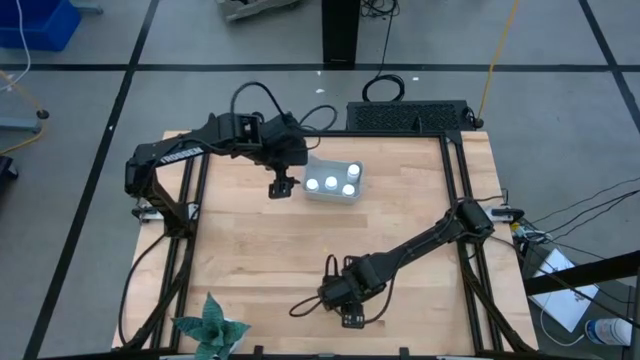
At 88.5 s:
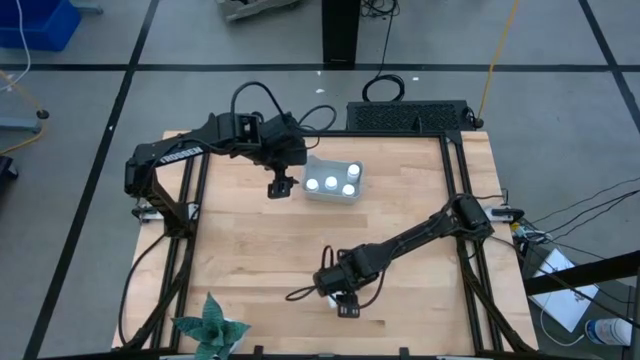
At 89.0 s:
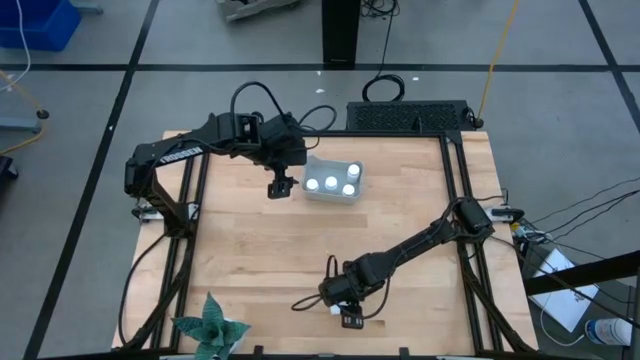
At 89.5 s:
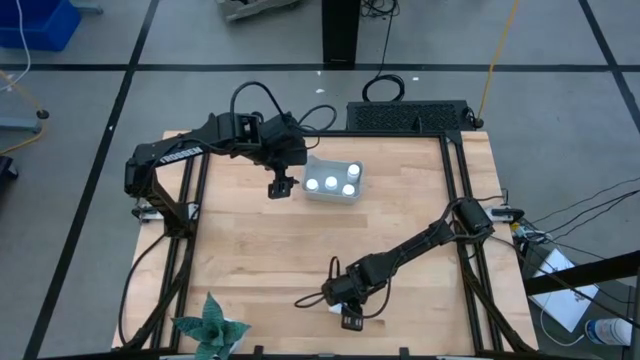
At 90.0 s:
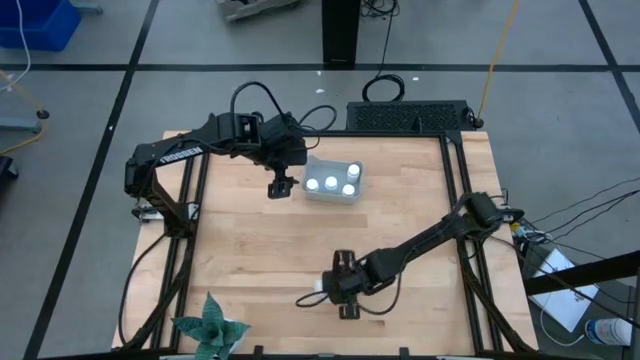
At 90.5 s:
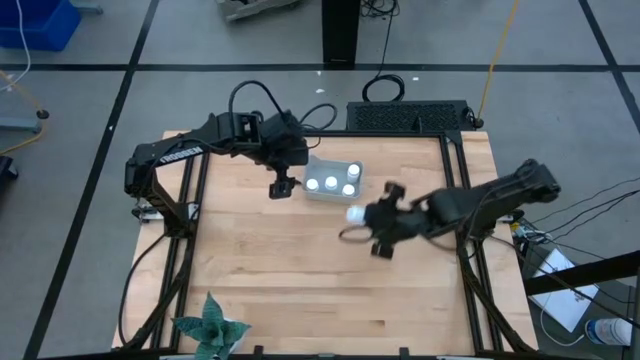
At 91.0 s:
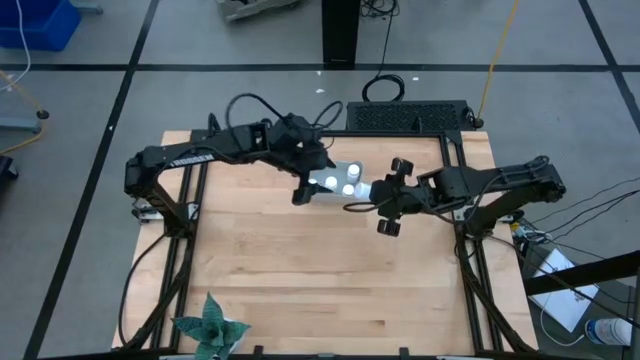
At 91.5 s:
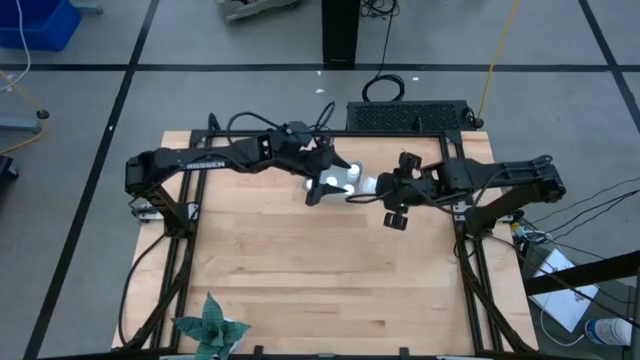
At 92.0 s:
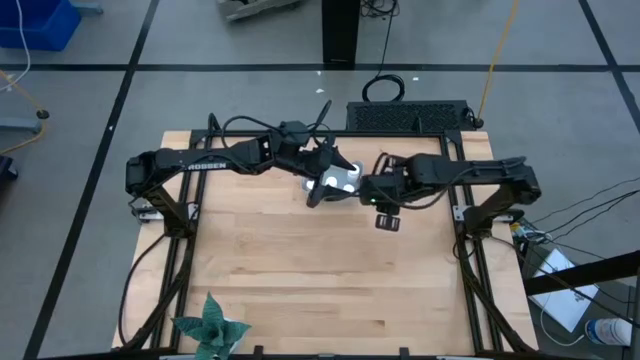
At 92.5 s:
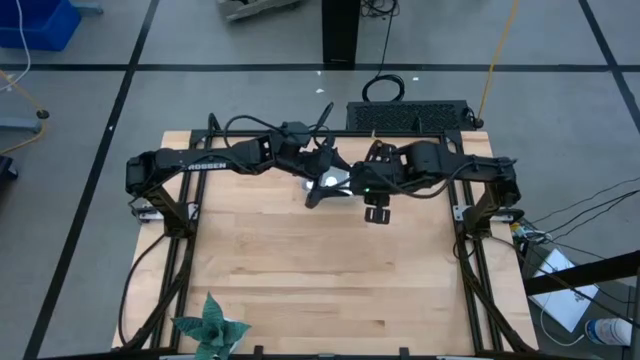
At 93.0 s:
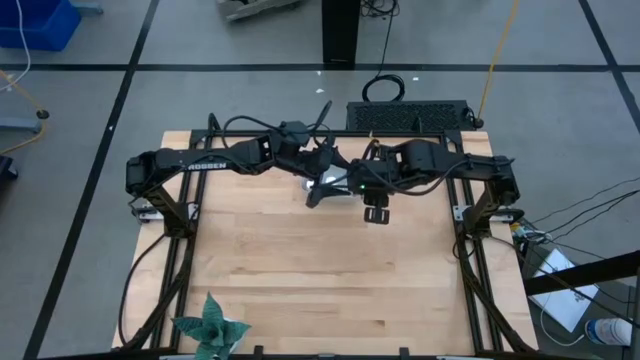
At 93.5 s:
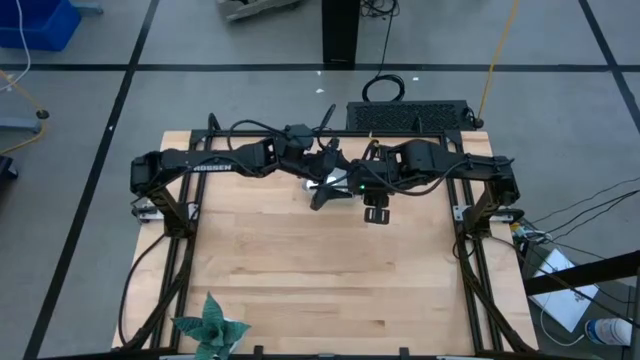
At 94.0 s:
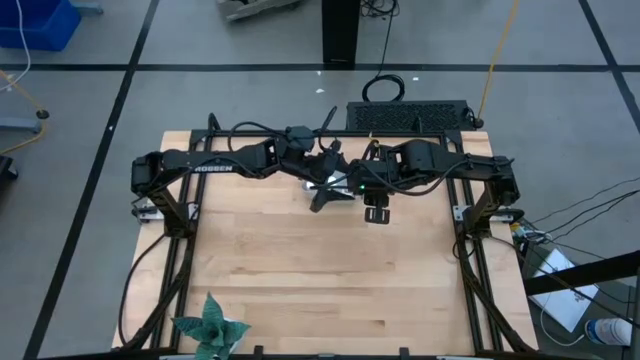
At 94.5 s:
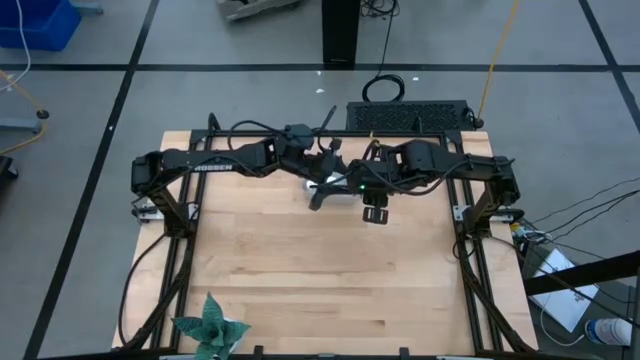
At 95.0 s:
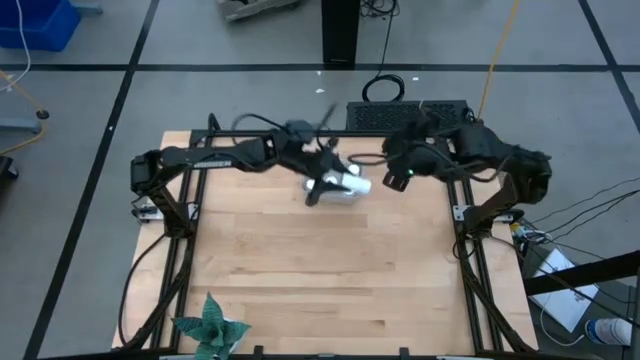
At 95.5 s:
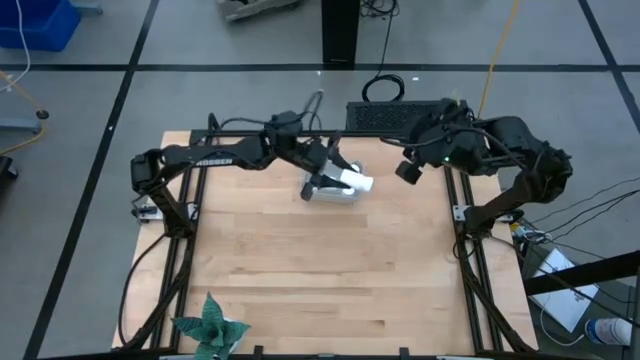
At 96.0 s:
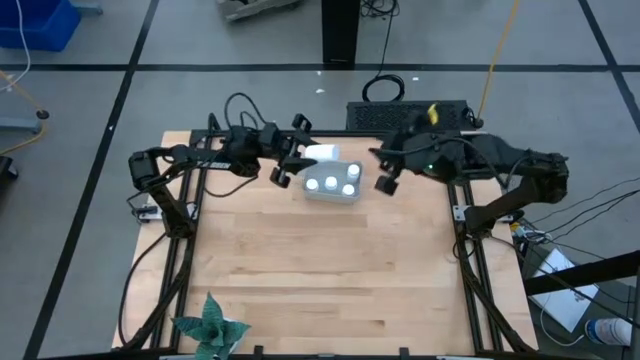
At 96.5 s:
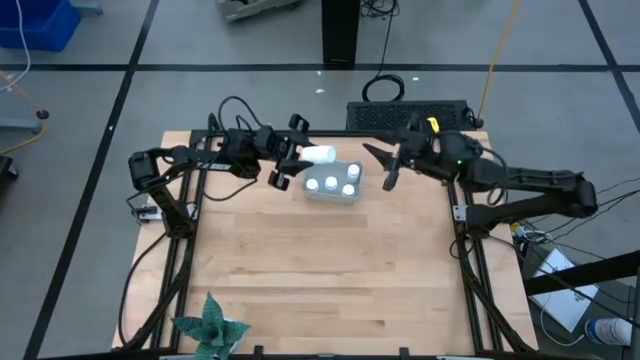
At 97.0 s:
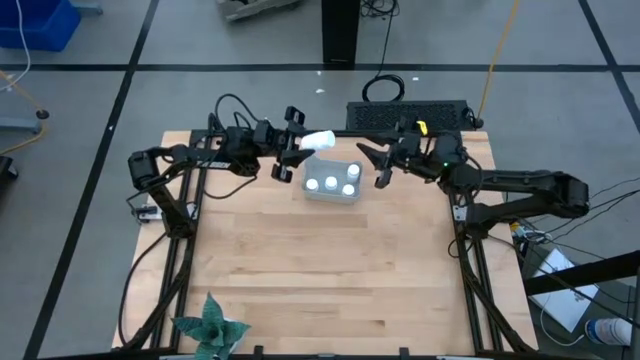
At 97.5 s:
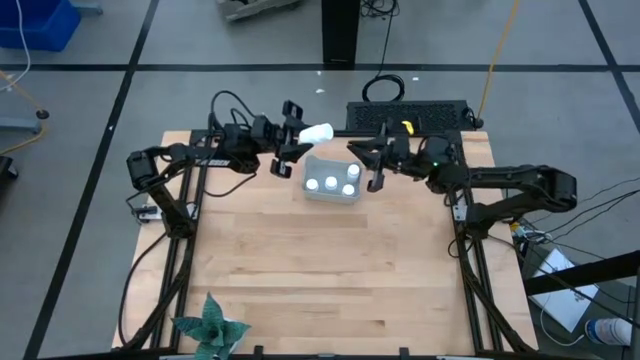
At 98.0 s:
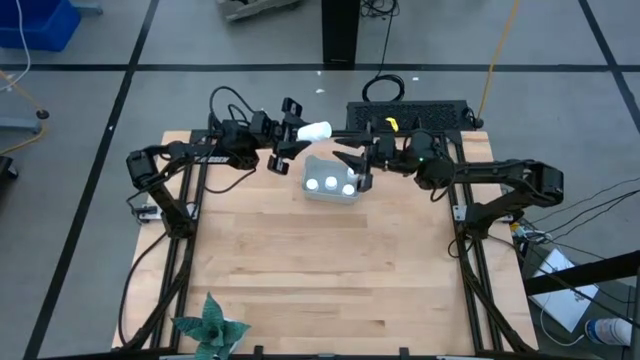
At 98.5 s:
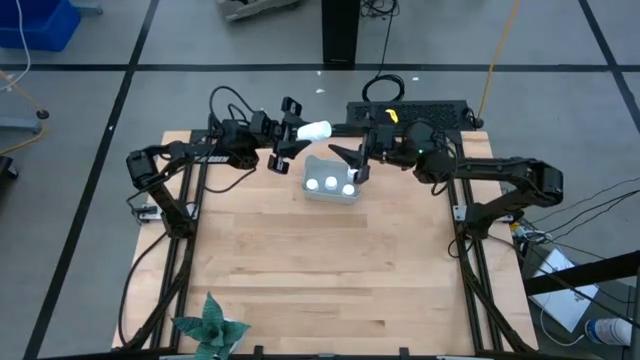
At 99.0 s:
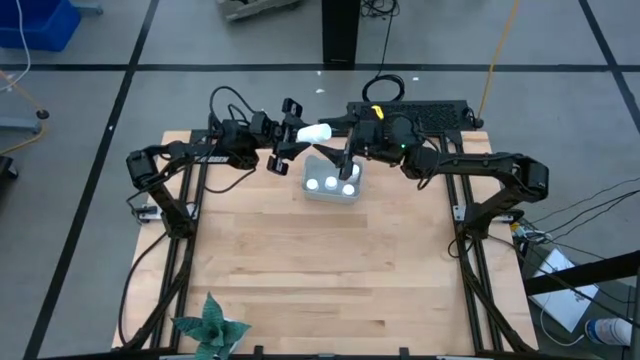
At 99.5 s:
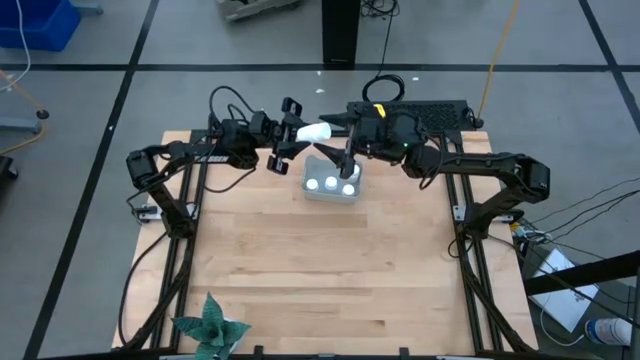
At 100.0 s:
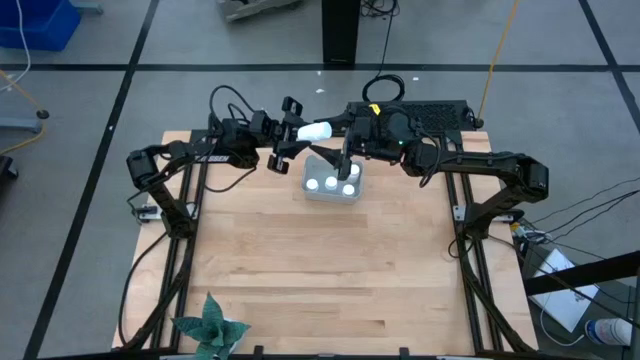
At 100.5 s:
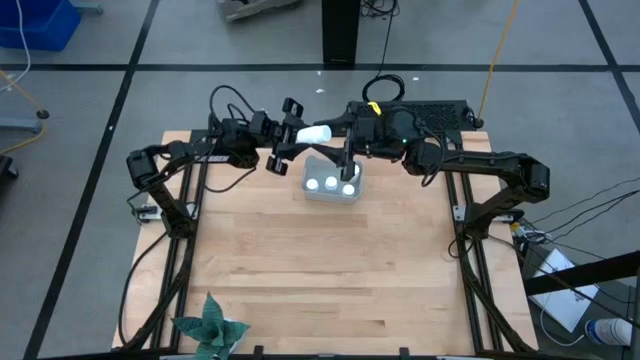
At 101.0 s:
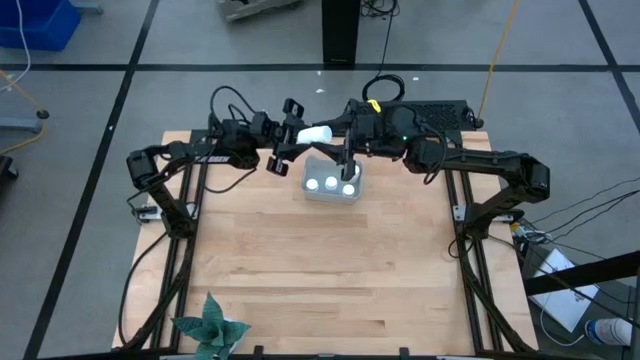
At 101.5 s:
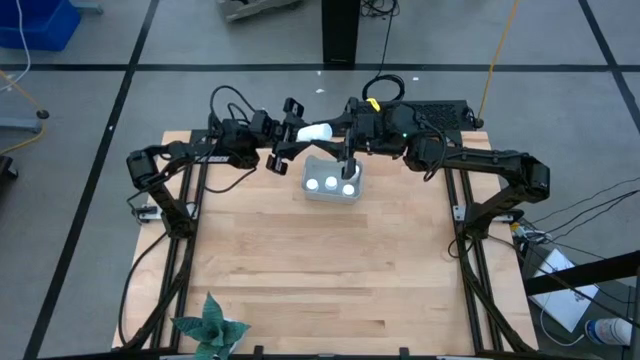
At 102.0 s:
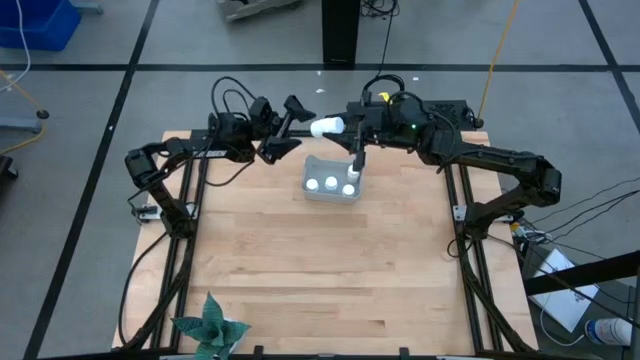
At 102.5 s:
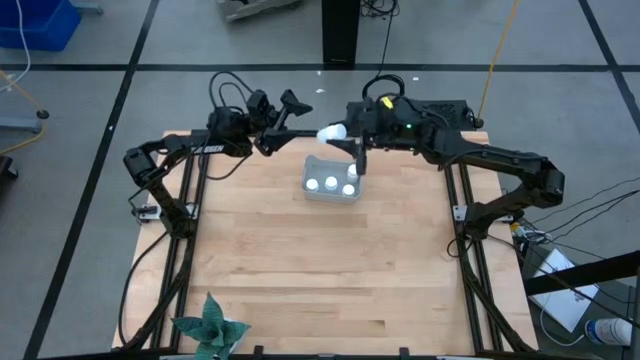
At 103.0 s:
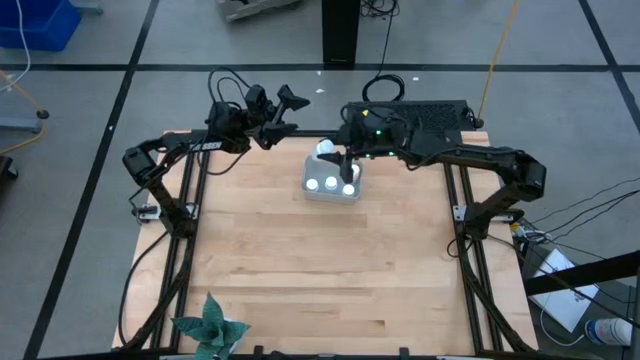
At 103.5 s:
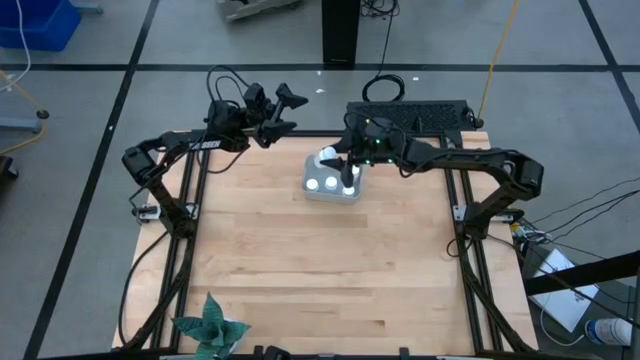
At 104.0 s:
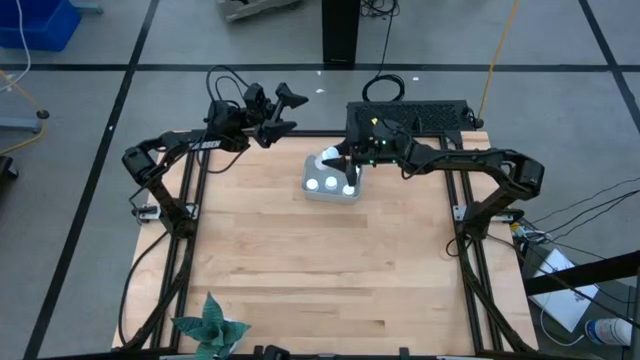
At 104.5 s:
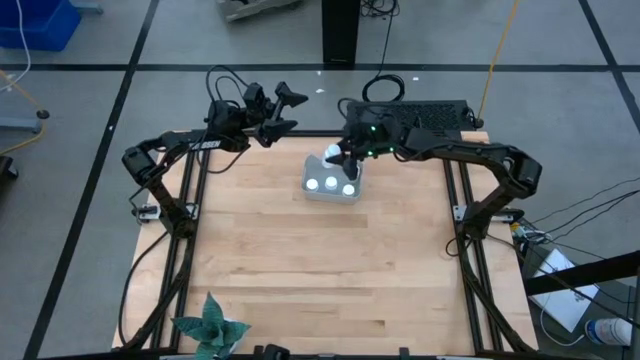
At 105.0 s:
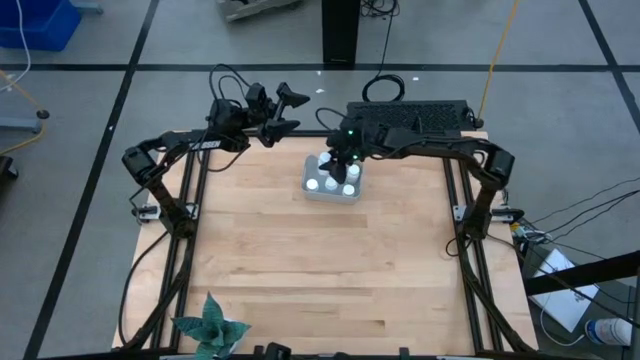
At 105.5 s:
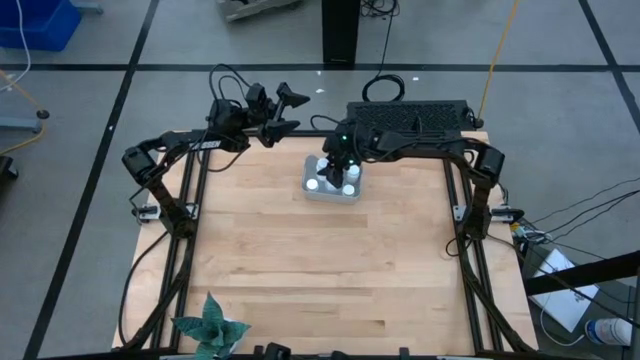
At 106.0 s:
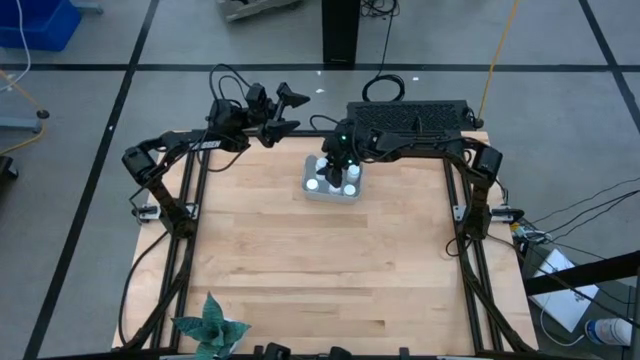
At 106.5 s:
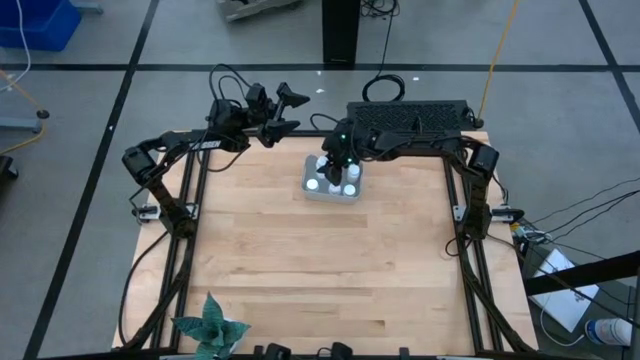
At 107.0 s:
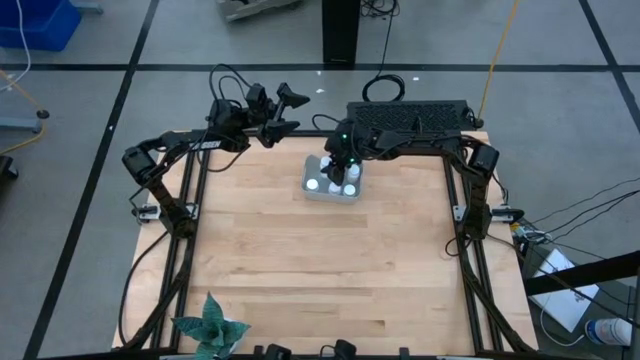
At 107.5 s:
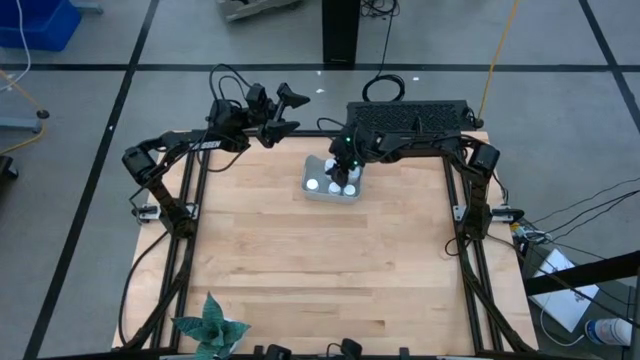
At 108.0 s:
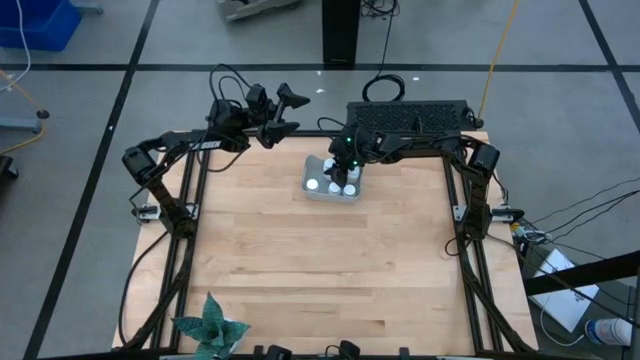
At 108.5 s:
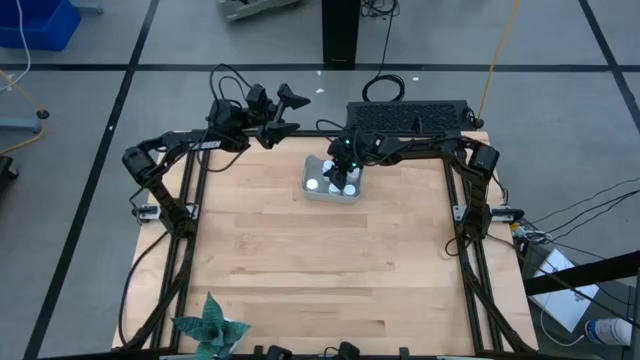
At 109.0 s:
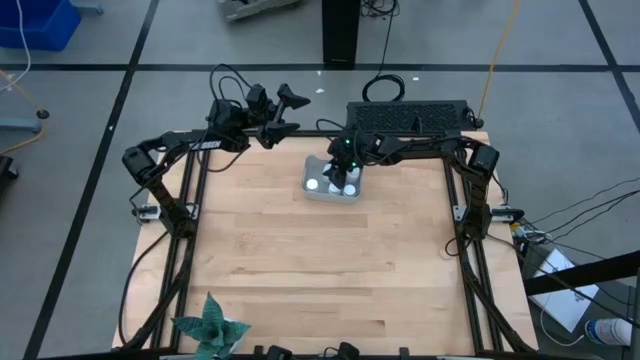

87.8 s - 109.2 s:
Task: Pick and place pill bottles into a basket
Put the white pill bottle into the gray bin
